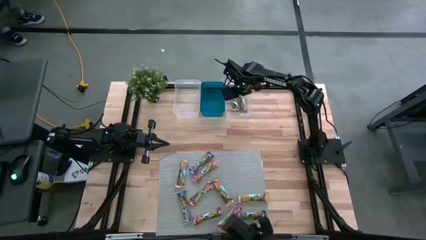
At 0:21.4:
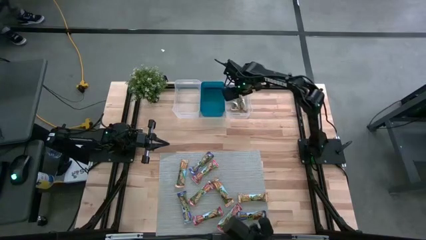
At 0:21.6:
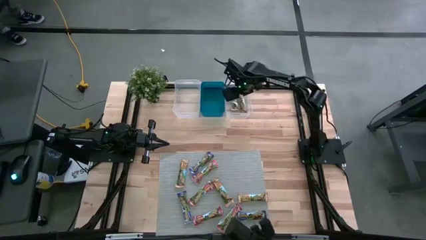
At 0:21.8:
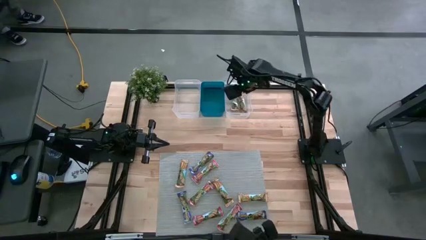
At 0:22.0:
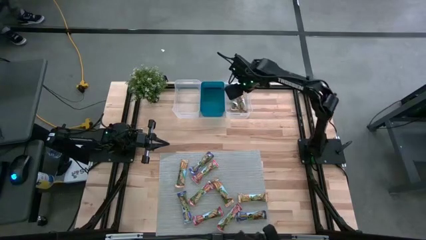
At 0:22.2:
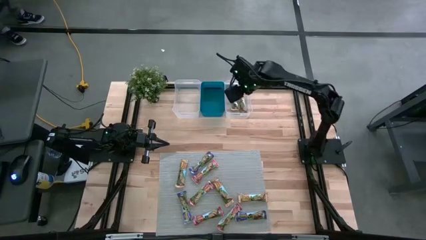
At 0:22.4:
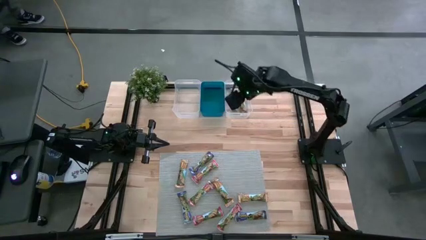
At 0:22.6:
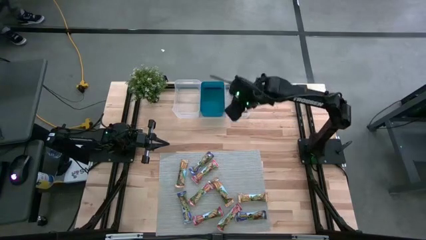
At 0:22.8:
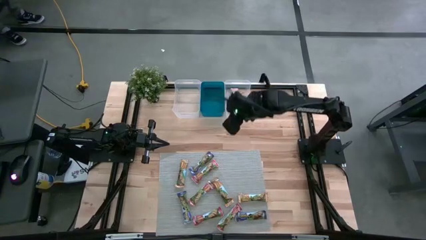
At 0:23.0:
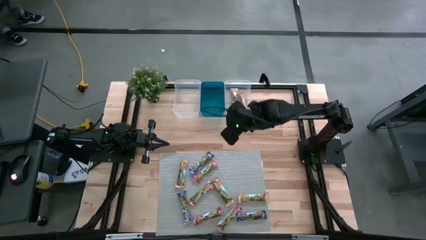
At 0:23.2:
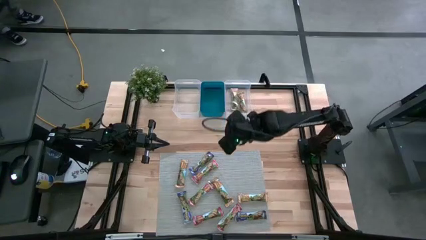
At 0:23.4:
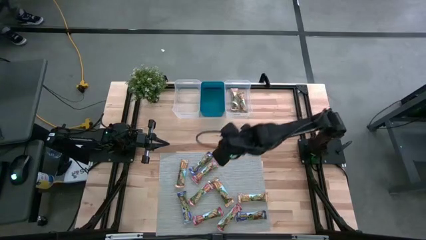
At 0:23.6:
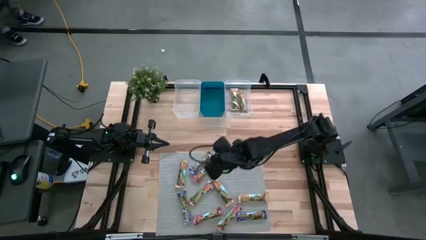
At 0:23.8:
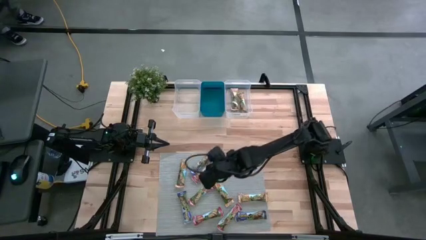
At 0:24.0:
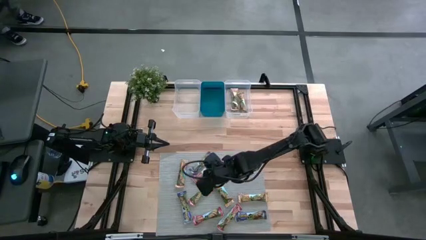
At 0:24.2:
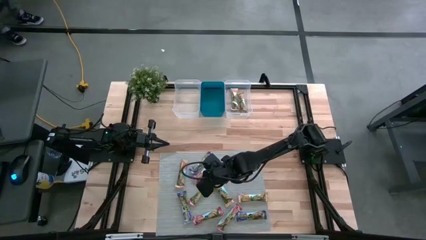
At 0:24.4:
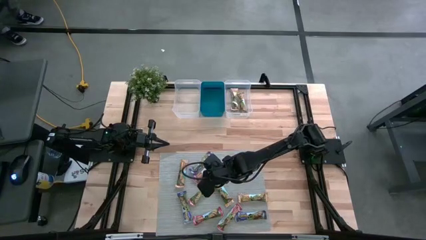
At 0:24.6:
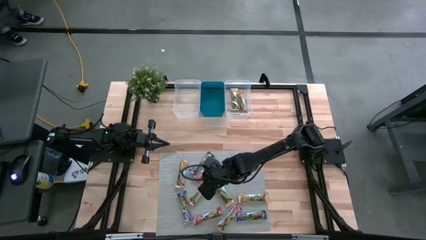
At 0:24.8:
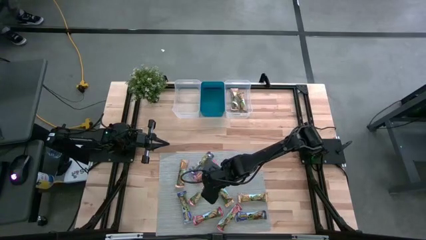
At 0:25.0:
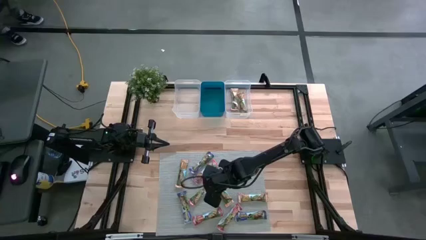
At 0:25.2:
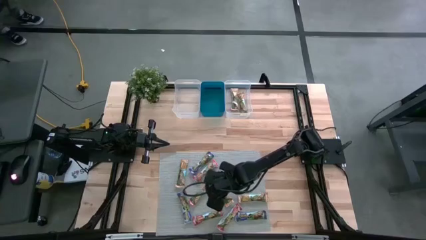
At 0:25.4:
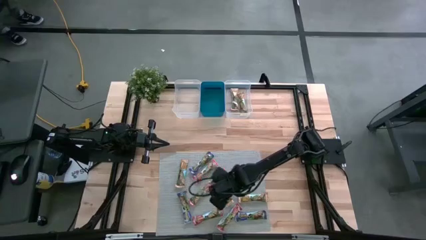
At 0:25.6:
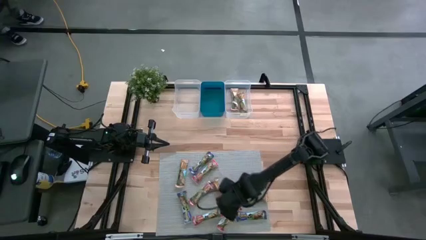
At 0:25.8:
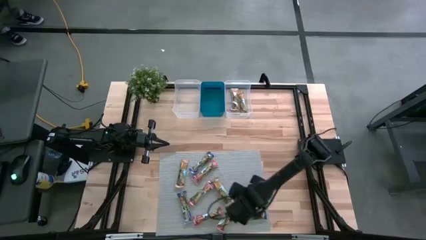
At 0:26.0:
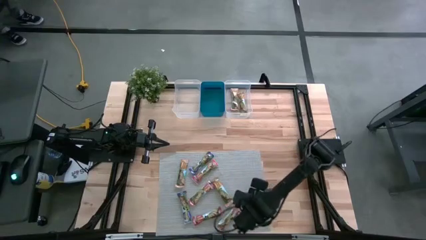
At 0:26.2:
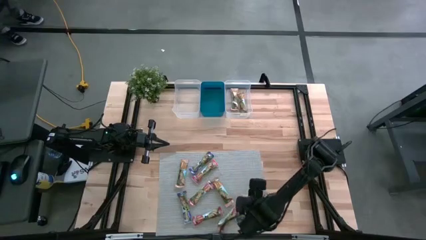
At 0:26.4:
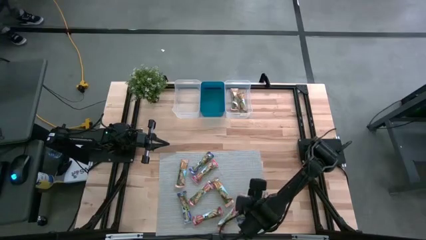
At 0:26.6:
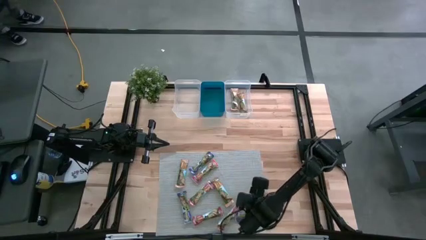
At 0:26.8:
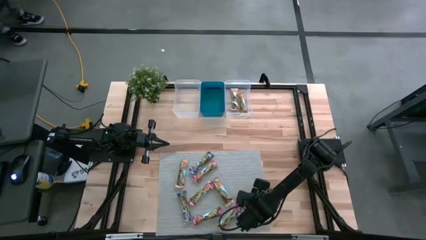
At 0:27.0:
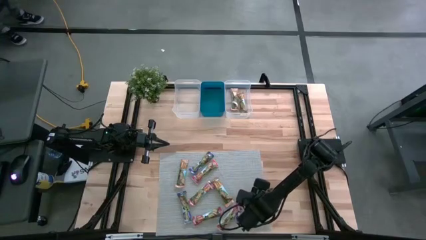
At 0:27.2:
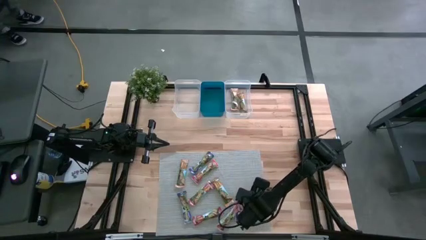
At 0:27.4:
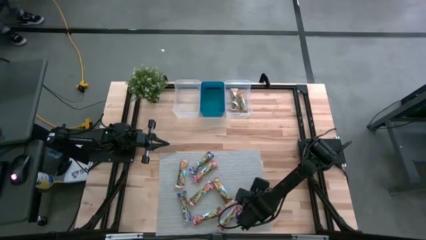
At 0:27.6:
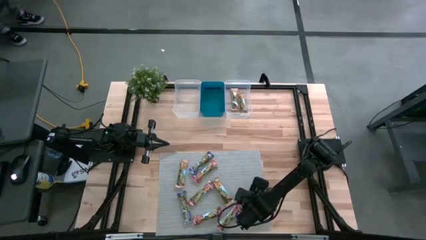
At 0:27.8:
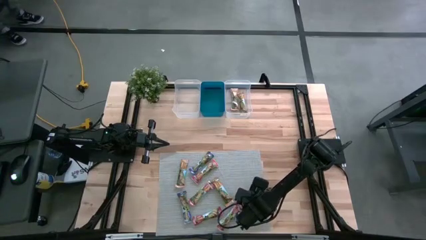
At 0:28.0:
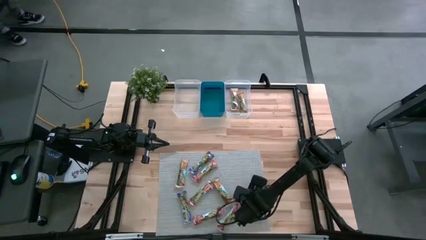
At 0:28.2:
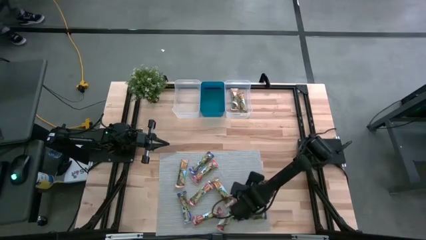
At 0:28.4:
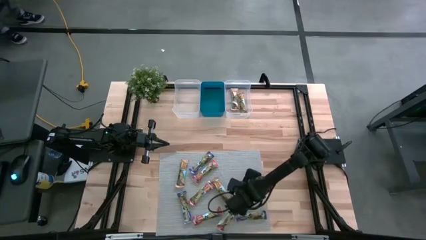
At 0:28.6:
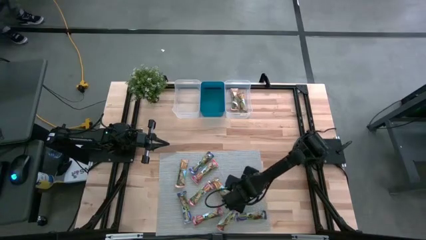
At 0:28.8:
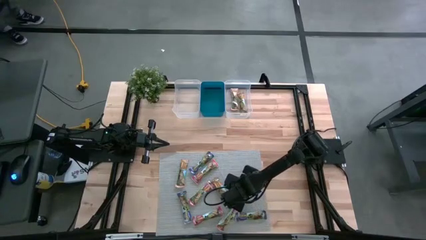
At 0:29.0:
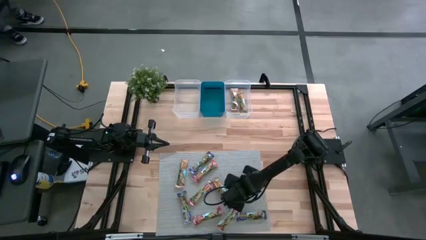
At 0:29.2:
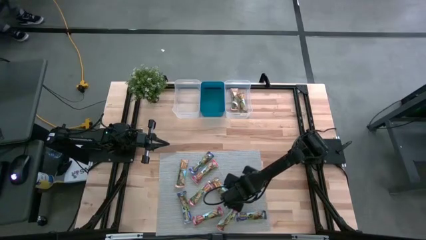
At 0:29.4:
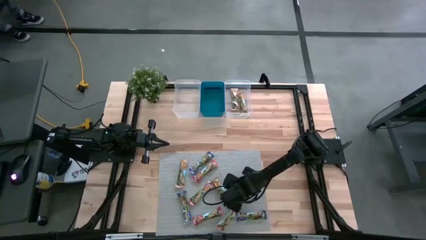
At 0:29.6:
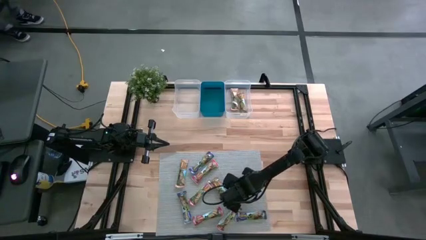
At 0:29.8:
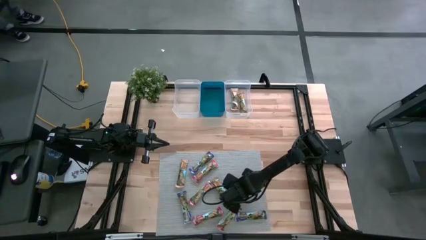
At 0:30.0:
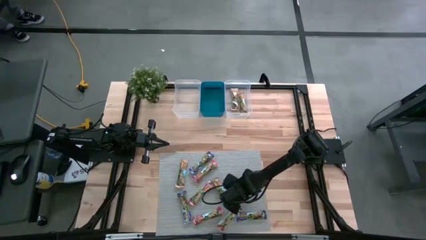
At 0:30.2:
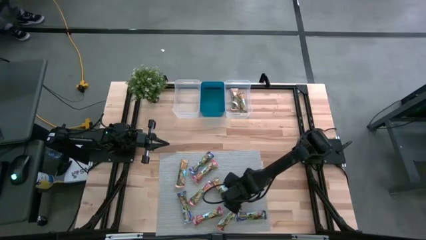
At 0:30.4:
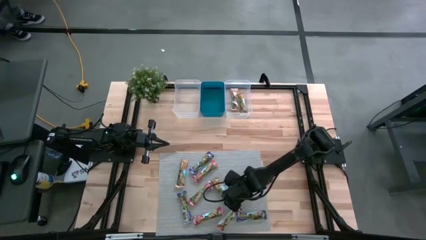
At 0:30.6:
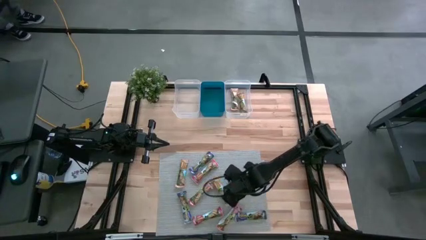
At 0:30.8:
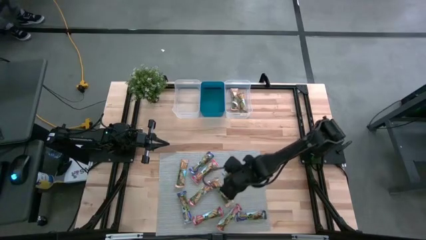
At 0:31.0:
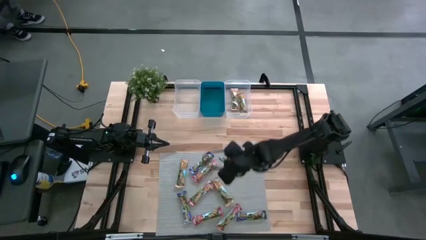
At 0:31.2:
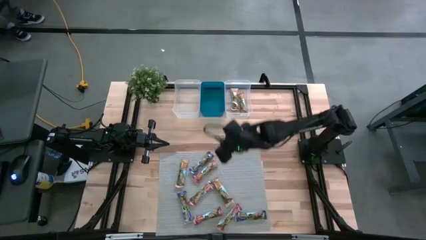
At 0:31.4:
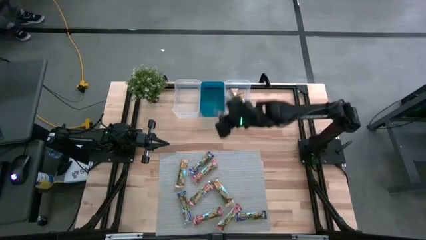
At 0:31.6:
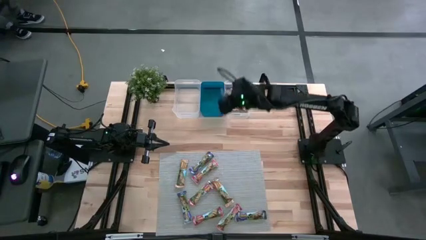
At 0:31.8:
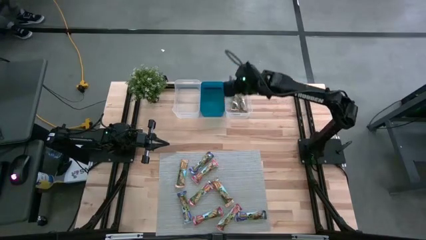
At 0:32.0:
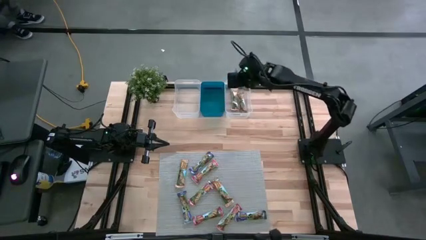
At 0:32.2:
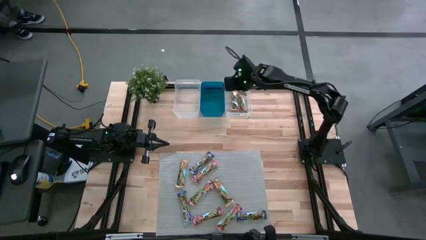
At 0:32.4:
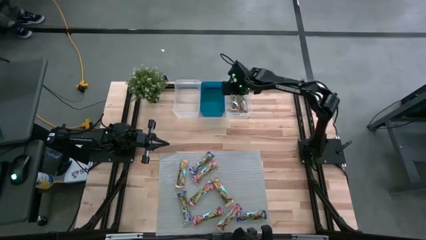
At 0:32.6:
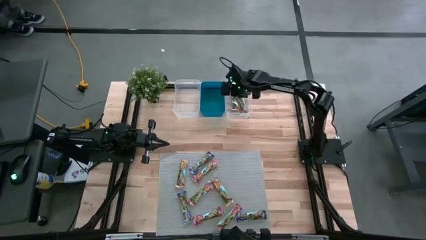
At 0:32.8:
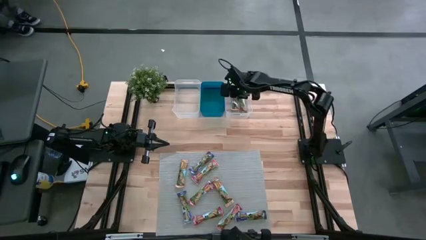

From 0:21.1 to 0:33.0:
Task: Pick and place Granola Bars by type
Put the orange granola bar into the right transparent bin

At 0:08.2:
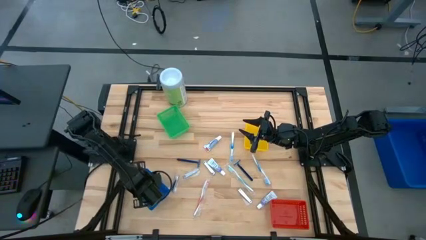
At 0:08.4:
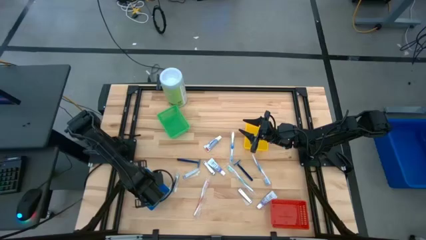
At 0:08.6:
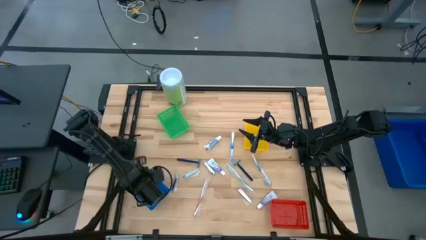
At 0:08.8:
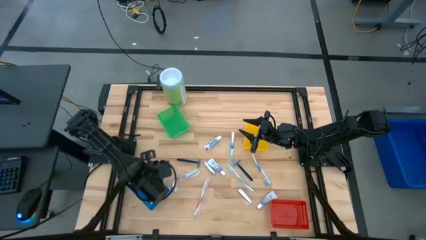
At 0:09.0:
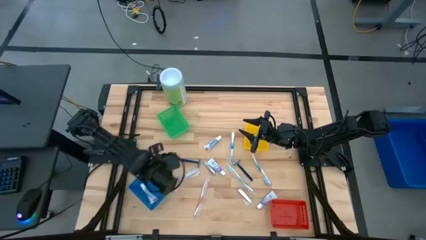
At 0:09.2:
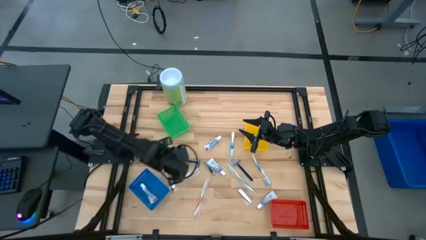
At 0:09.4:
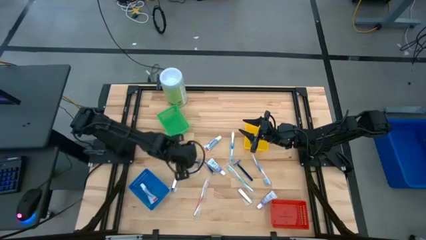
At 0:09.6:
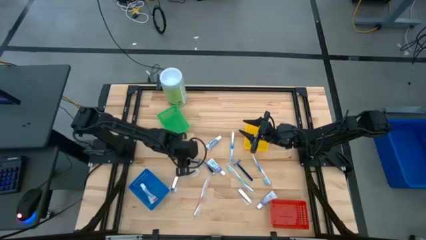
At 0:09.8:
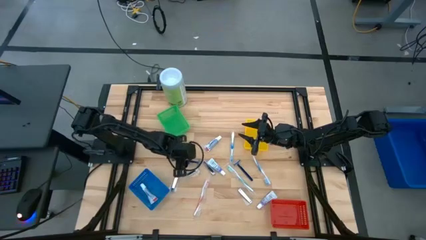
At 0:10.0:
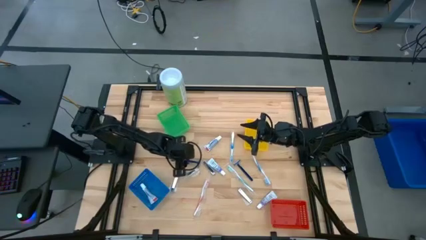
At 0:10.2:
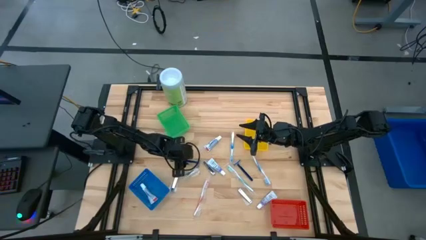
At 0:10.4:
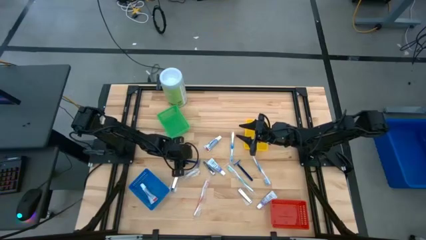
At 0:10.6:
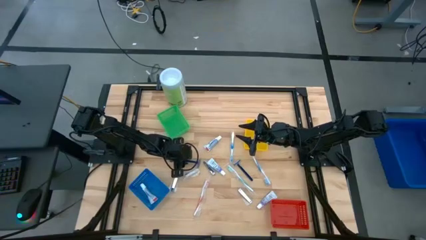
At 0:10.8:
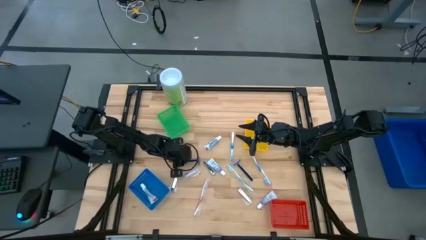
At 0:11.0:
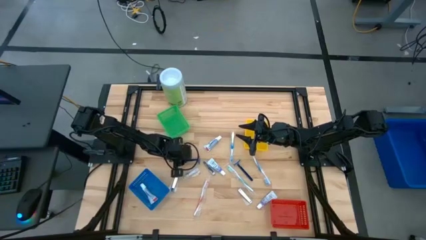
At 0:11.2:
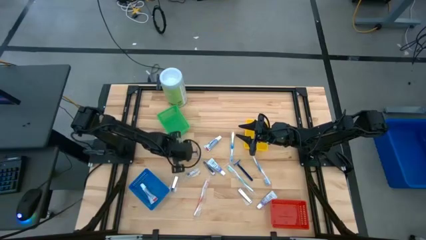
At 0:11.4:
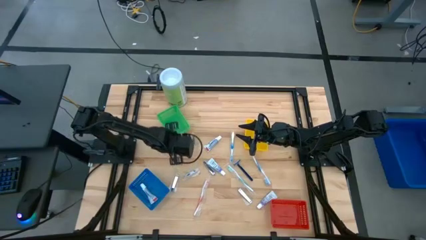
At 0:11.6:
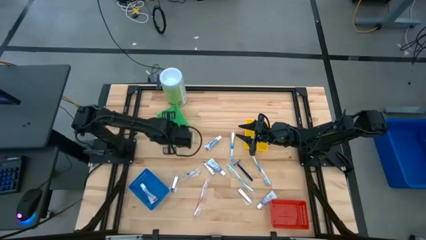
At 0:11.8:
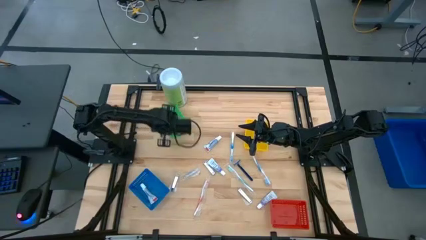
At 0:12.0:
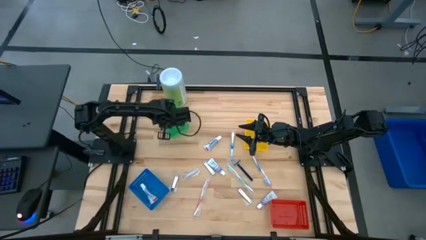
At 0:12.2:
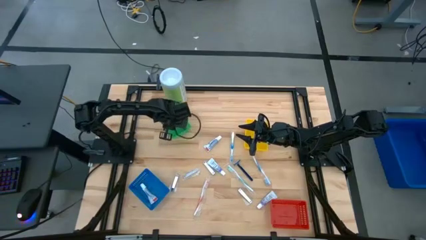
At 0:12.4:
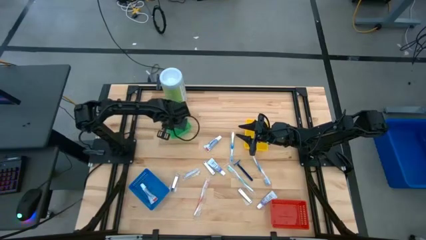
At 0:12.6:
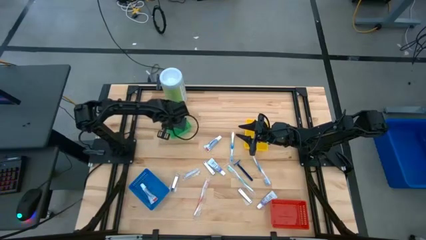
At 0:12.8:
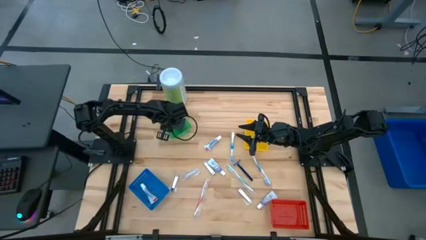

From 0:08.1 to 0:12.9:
Task: Pick & Place Travel size toiletries
Put the left razor into the green bin
